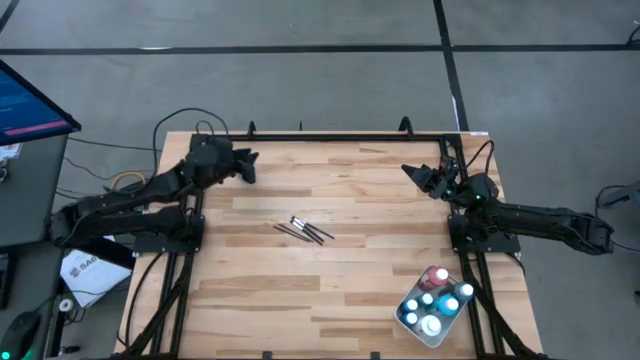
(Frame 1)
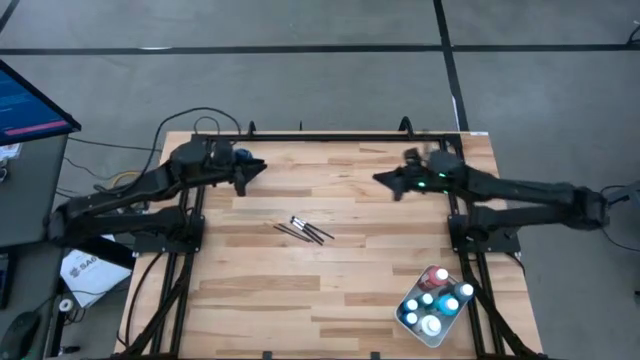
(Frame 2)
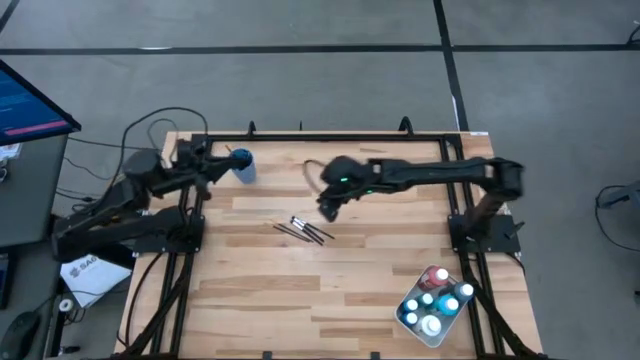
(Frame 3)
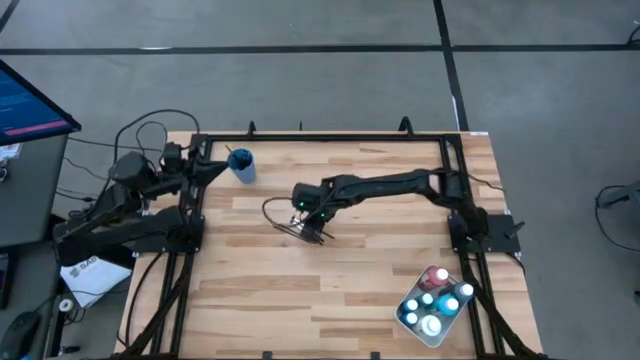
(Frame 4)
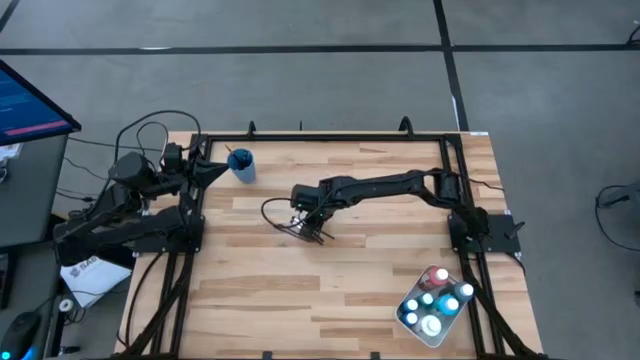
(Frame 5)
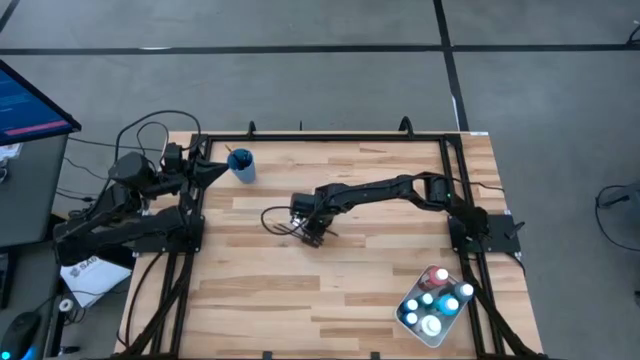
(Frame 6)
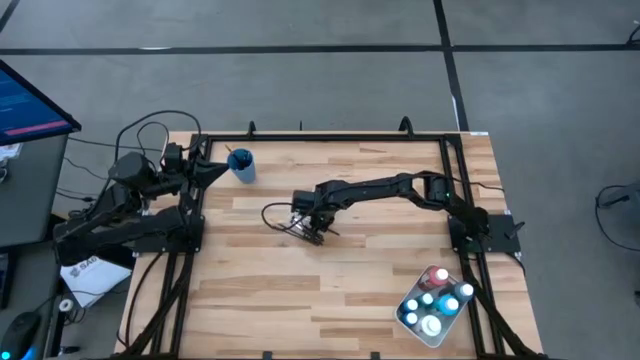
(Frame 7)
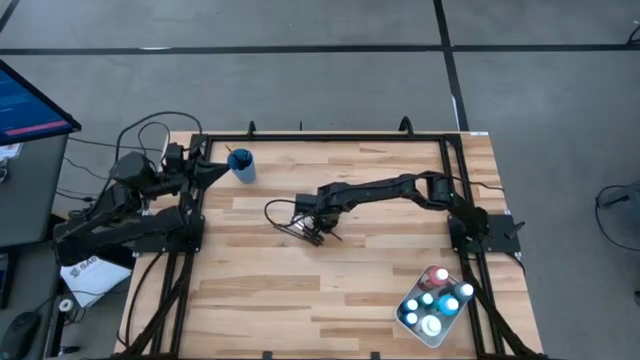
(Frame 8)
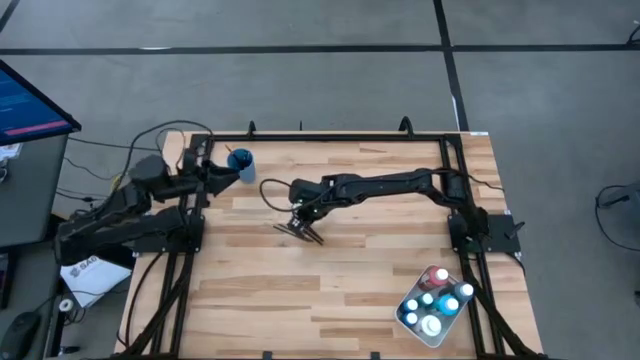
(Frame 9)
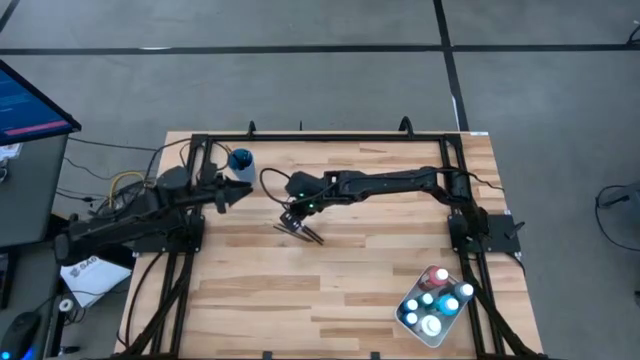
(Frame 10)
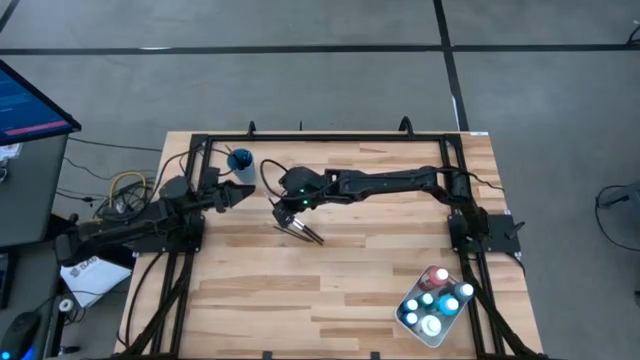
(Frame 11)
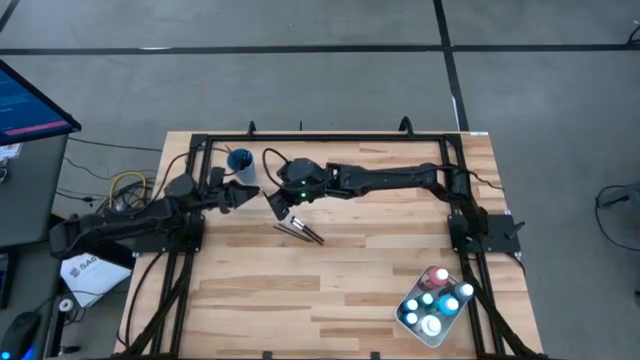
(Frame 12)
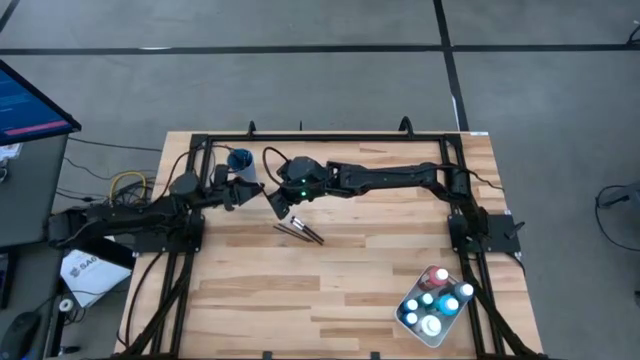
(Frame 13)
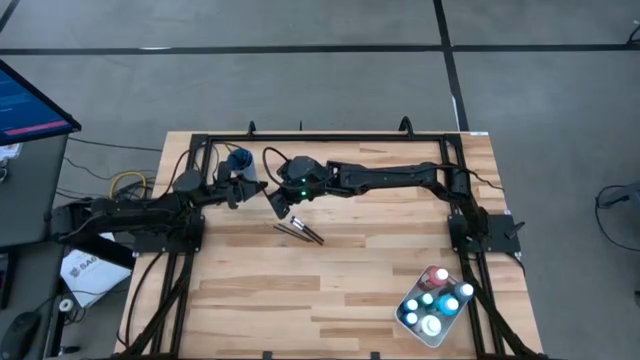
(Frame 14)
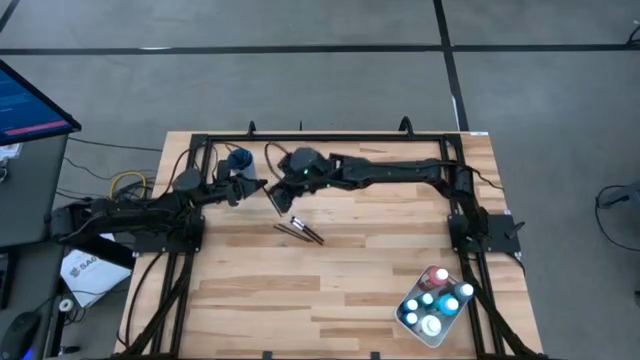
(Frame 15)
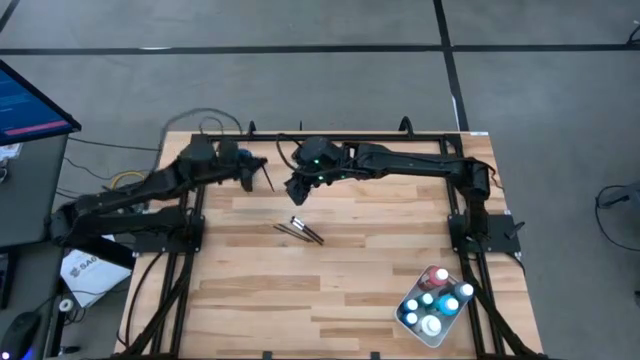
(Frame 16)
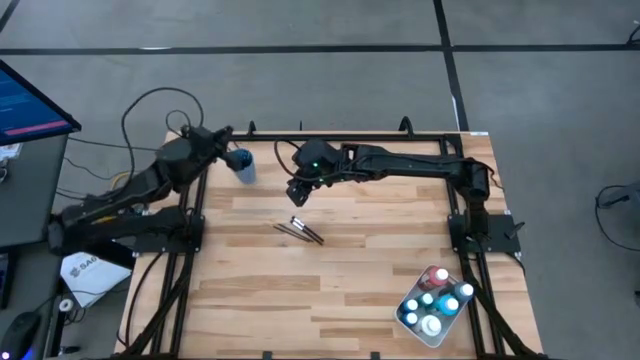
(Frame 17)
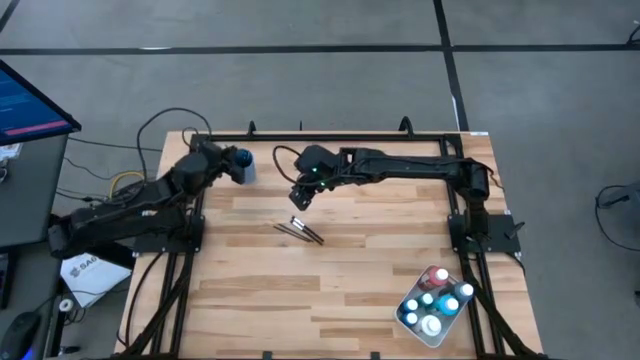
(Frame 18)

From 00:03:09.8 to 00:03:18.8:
Task: Pick & Place Paint Supplies
Put the silver paint brush into the blue cup

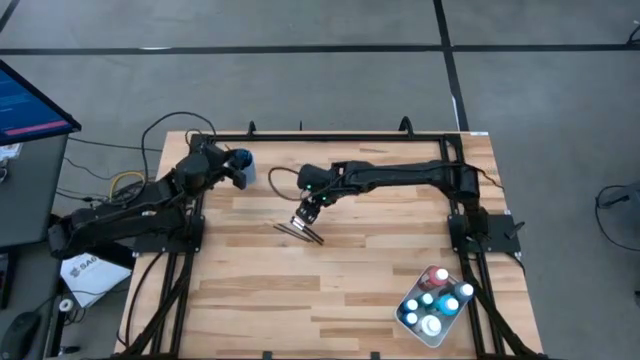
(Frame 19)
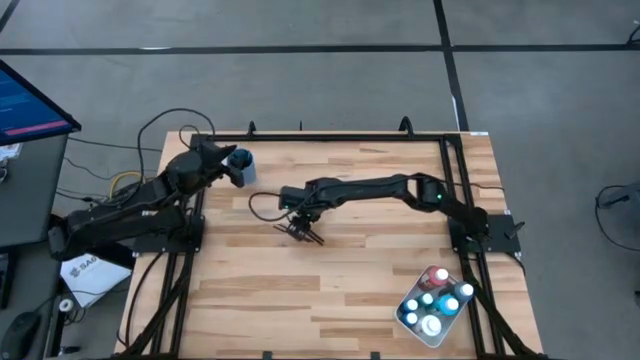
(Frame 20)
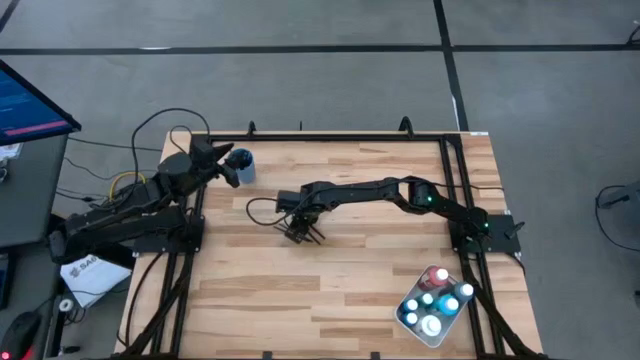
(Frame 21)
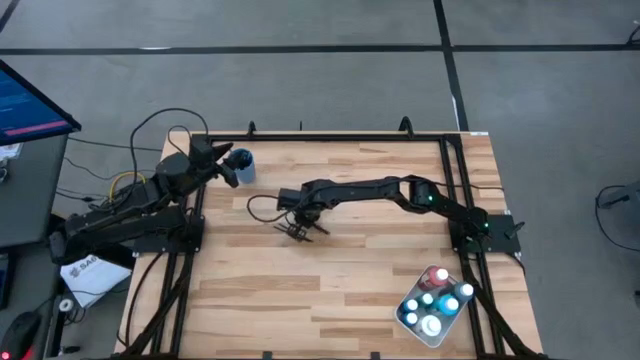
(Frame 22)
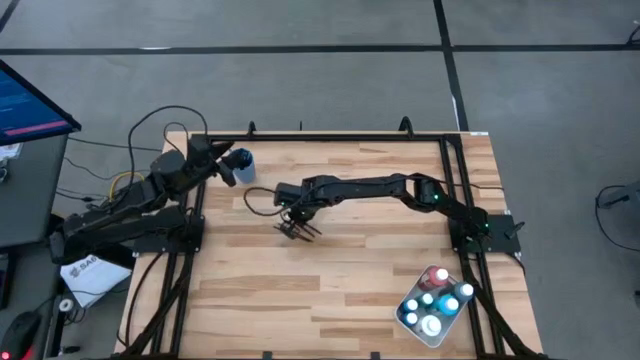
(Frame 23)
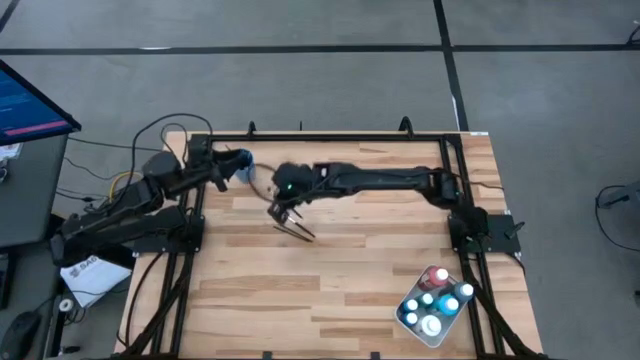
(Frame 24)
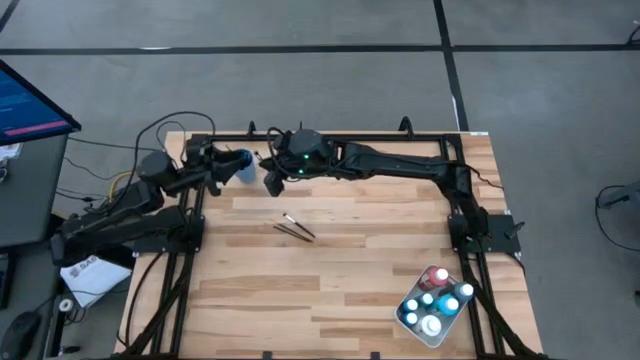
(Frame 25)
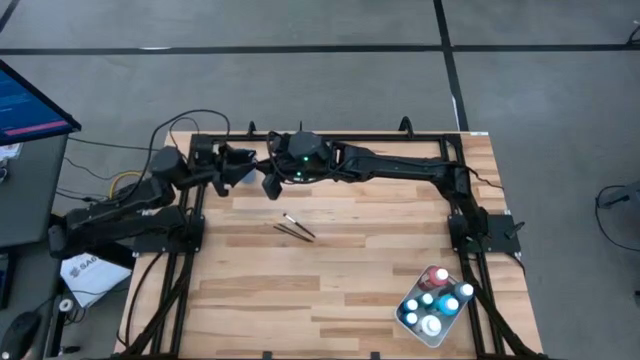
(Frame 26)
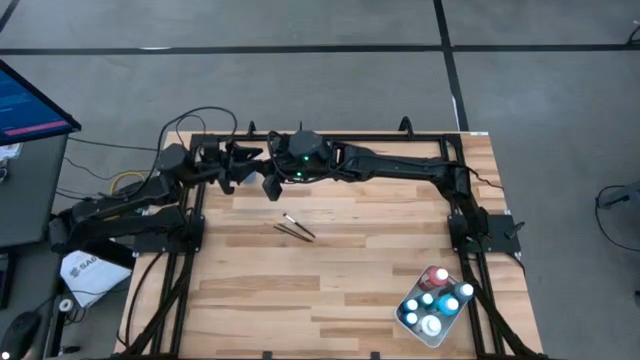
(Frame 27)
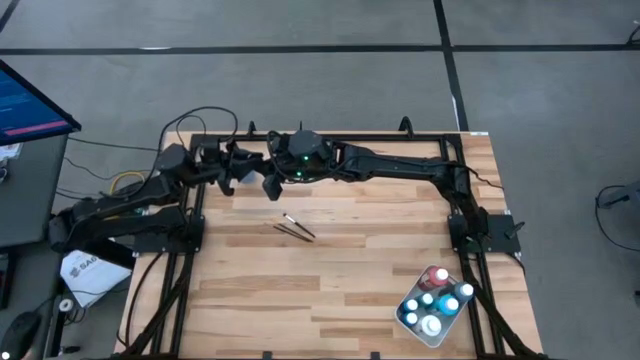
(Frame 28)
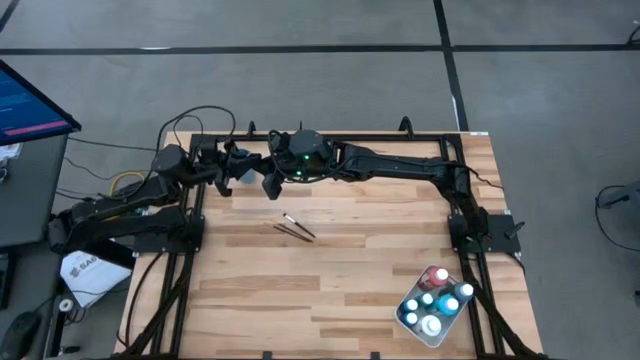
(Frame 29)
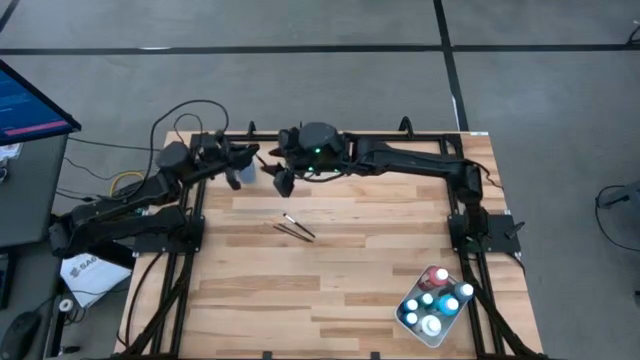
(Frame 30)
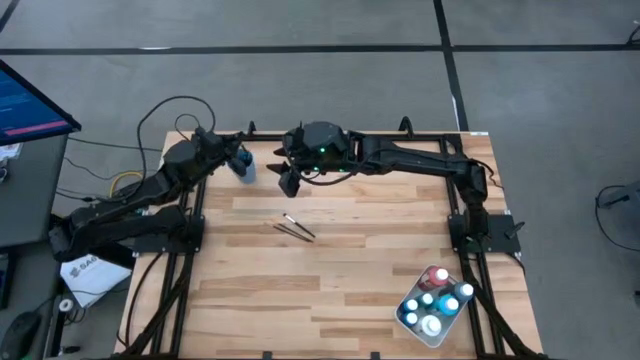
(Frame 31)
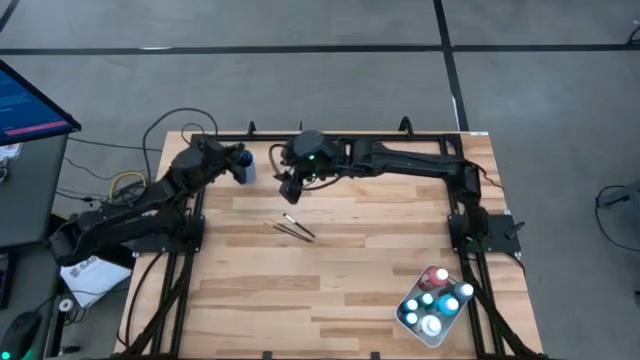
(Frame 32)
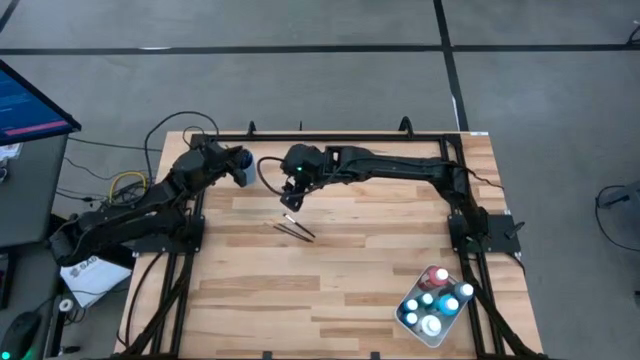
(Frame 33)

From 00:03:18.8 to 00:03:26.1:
Put the silver paint brush into the blue cup

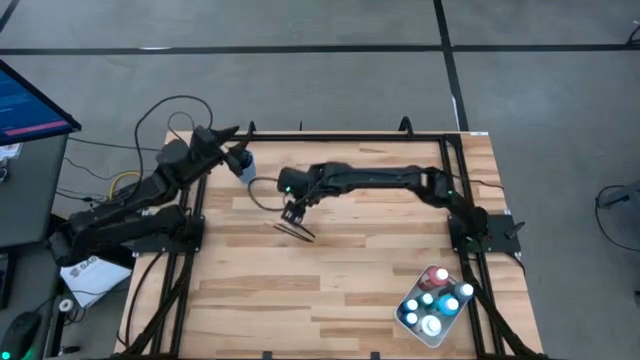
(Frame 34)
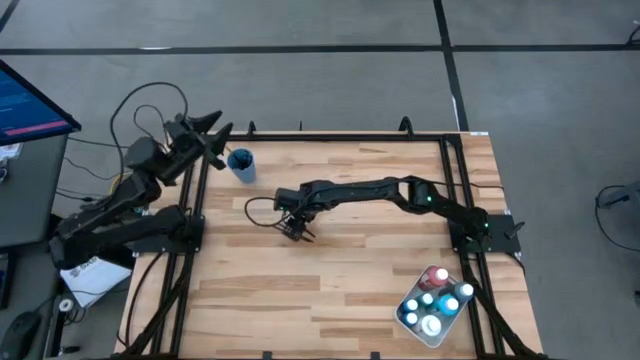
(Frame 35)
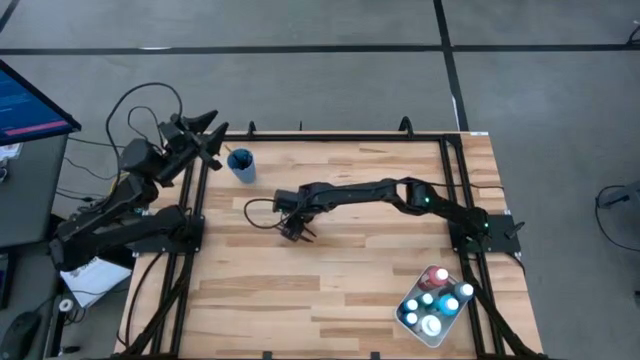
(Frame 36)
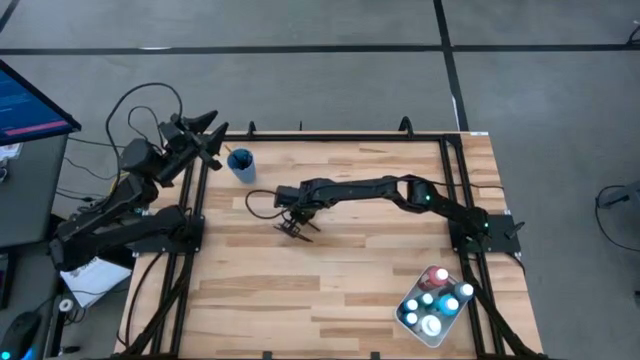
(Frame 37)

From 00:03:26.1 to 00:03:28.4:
Put the silver paint brush into the blue cup

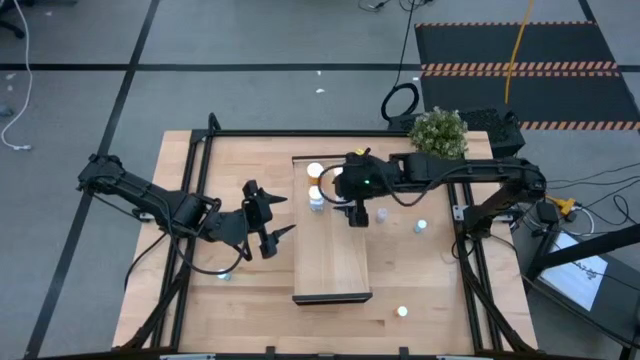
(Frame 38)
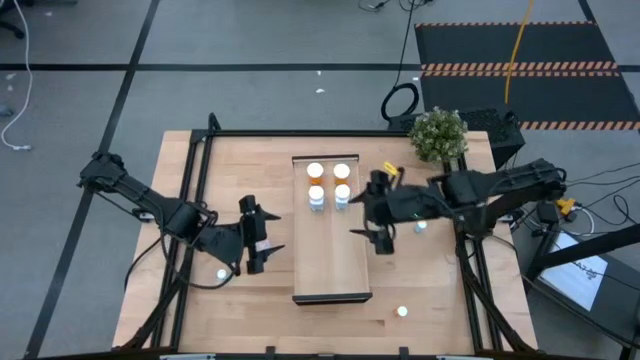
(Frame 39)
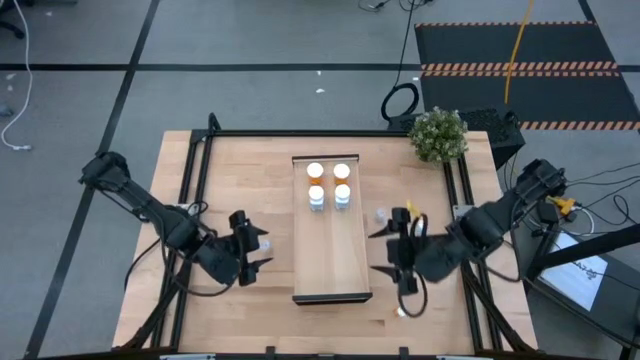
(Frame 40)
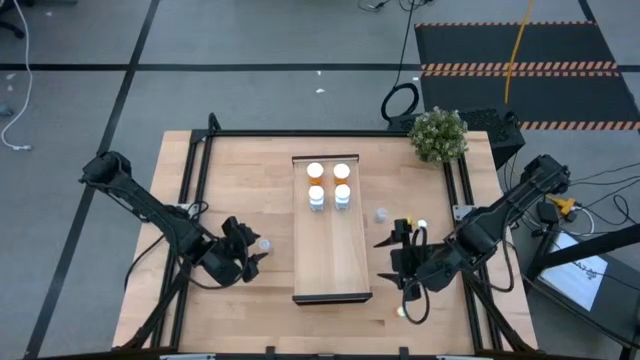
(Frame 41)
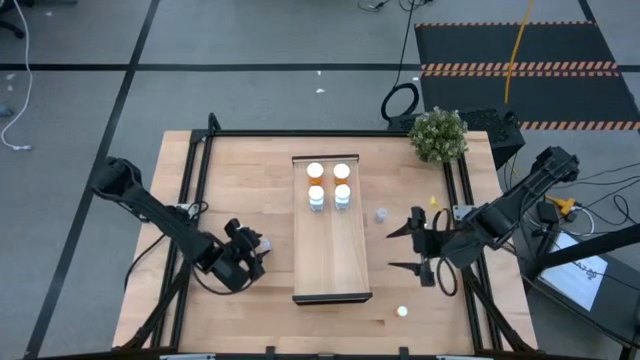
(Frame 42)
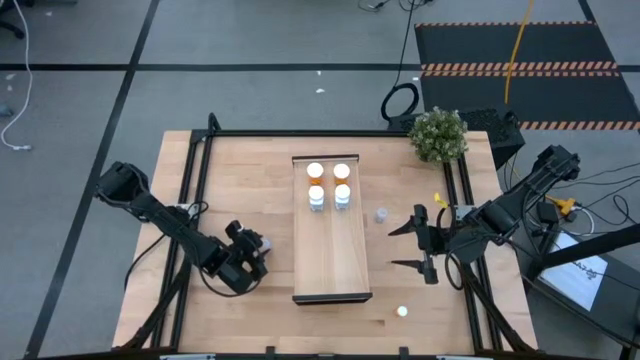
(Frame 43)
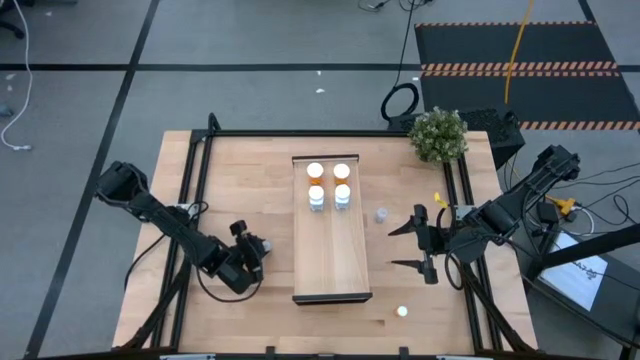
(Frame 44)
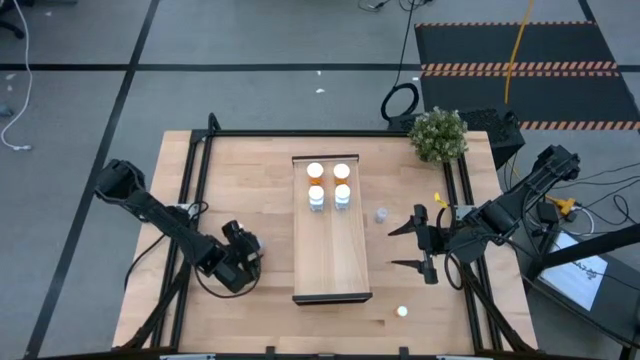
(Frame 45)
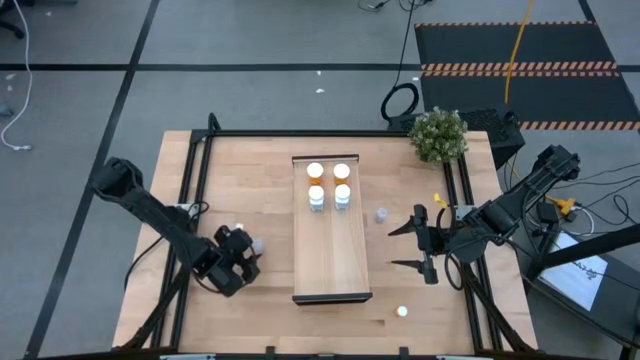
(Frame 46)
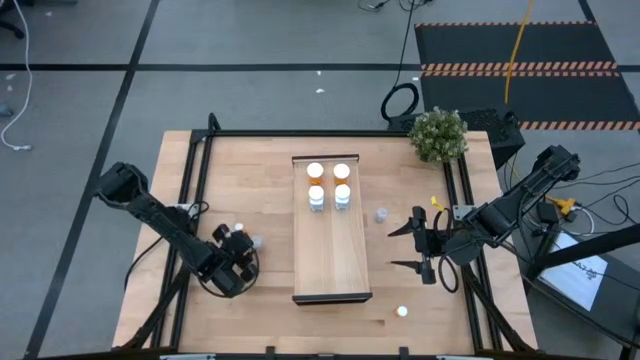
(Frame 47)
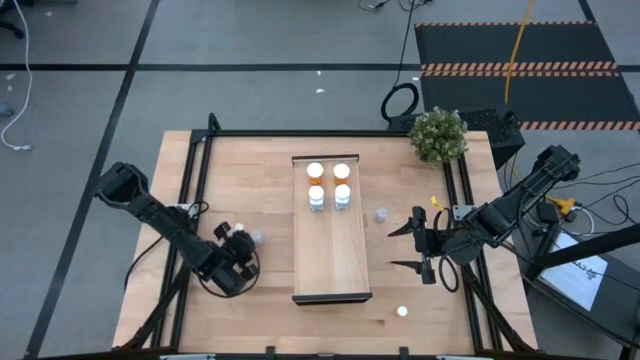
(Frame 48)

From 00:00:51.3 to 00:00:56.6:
Task: Pick and place medicine bottles onto shelf by color
Put the bottom transparent pill bottle on the shelf
